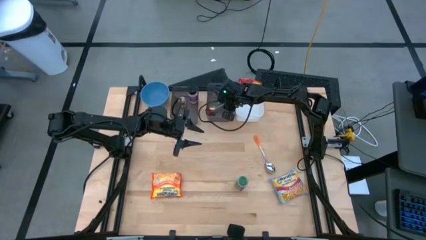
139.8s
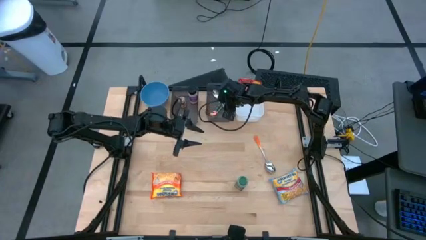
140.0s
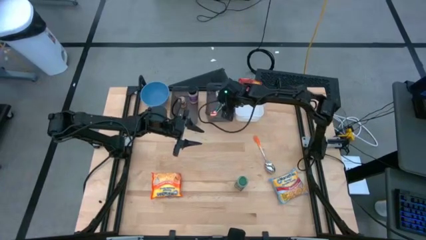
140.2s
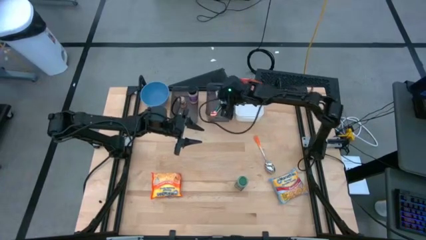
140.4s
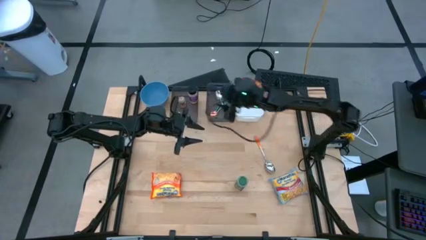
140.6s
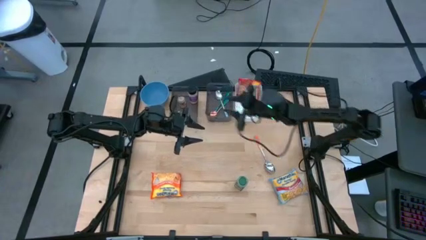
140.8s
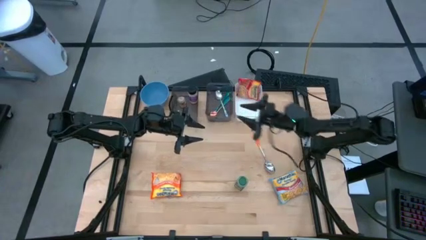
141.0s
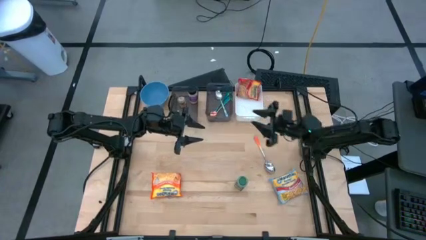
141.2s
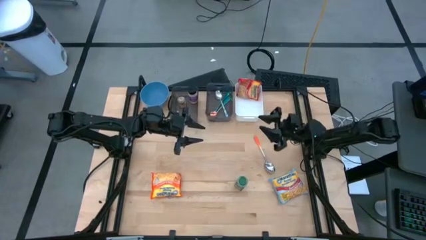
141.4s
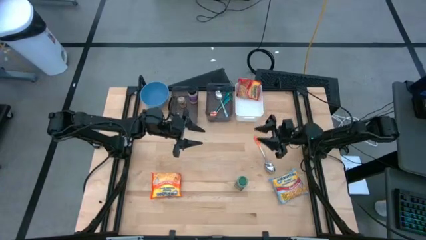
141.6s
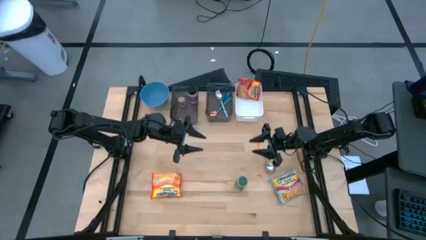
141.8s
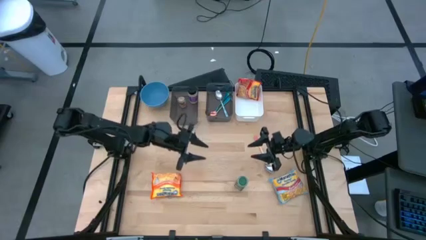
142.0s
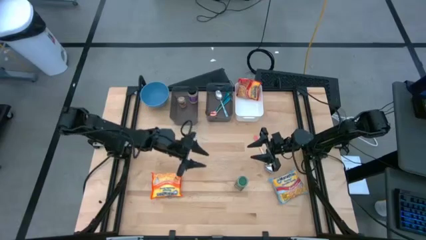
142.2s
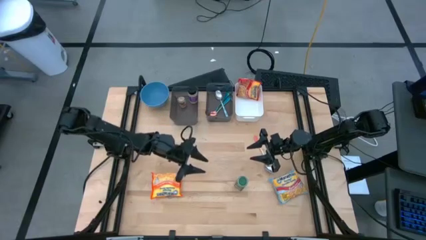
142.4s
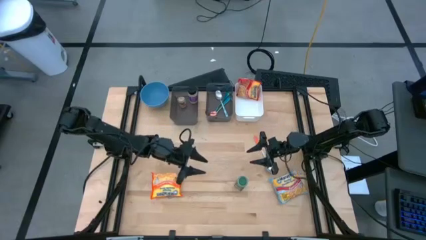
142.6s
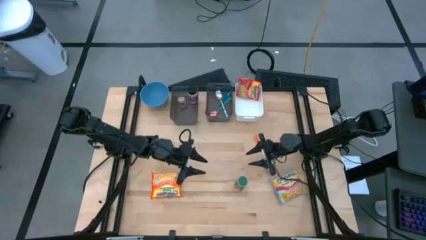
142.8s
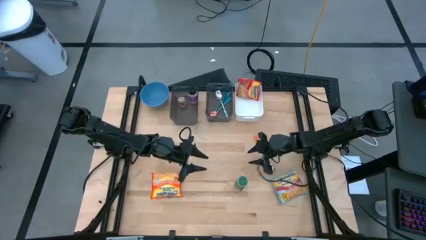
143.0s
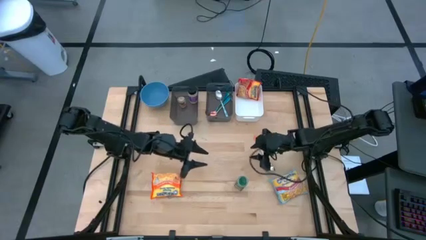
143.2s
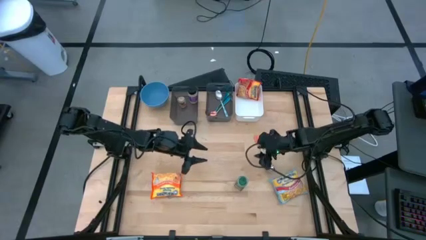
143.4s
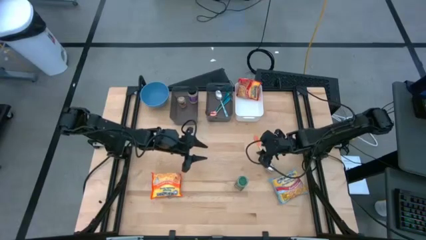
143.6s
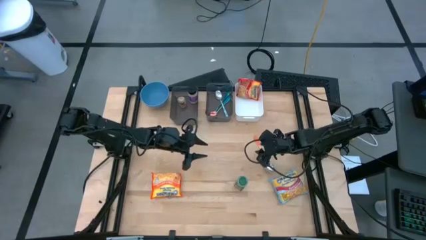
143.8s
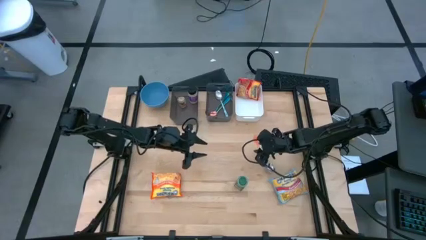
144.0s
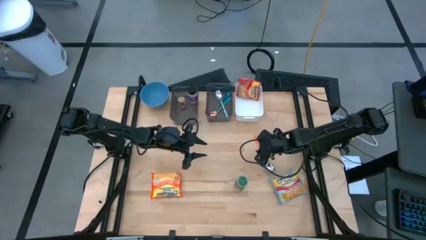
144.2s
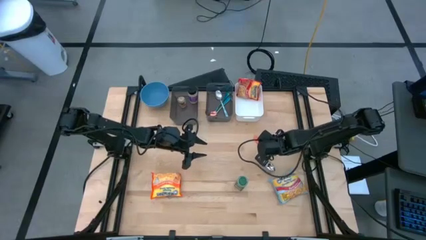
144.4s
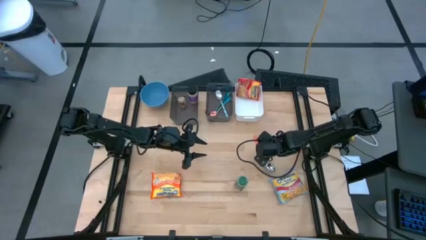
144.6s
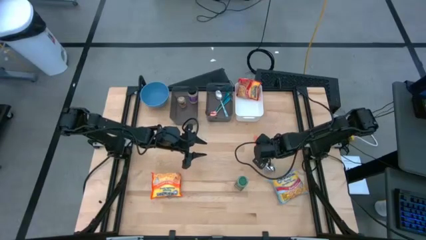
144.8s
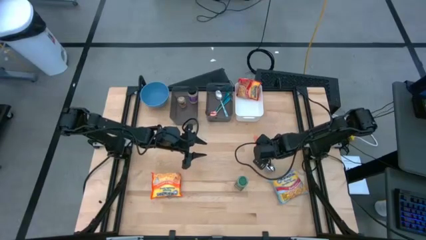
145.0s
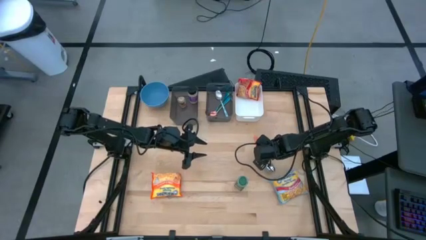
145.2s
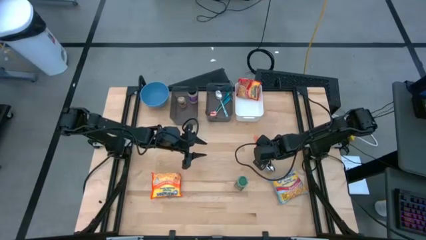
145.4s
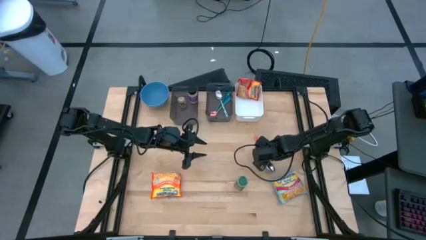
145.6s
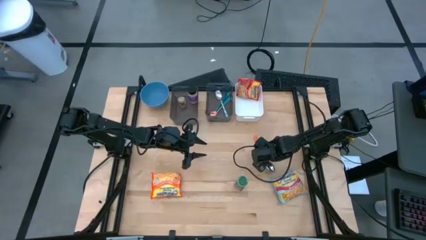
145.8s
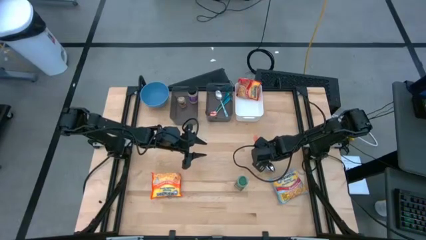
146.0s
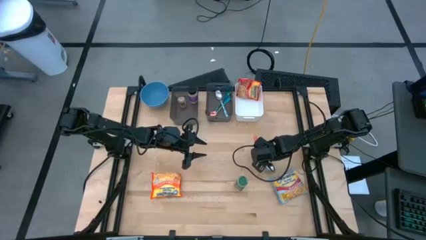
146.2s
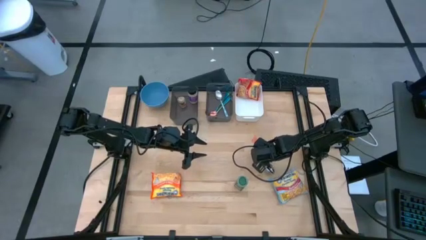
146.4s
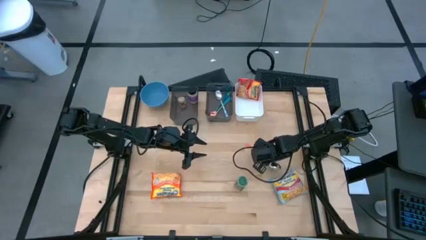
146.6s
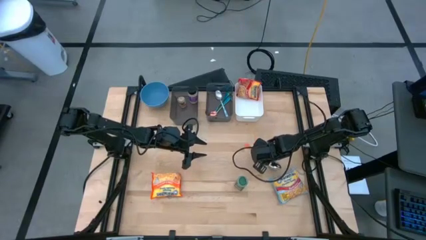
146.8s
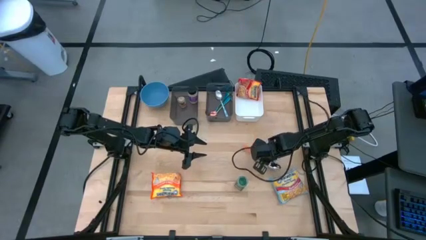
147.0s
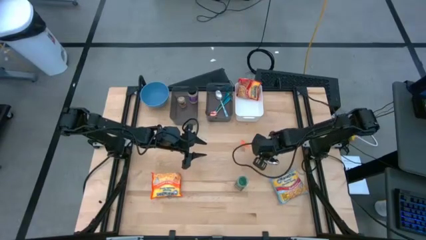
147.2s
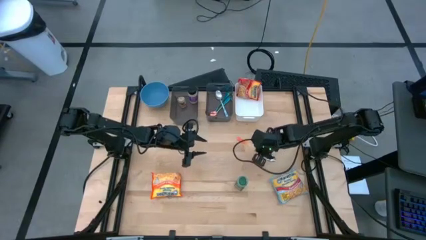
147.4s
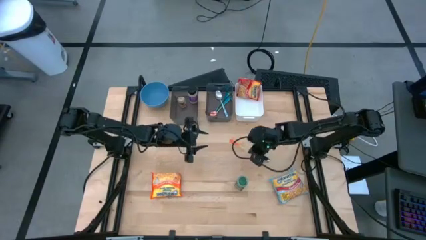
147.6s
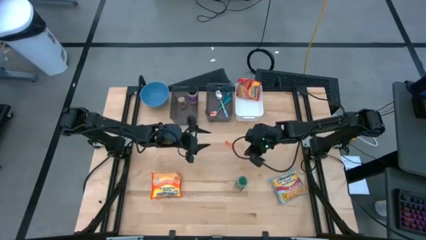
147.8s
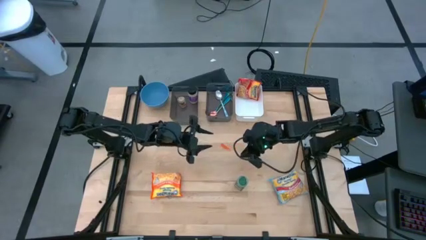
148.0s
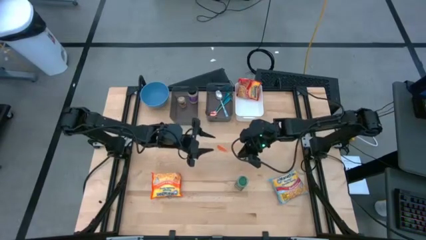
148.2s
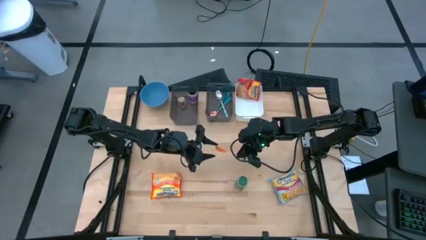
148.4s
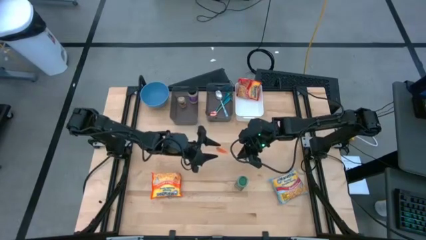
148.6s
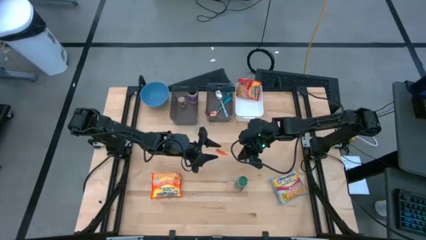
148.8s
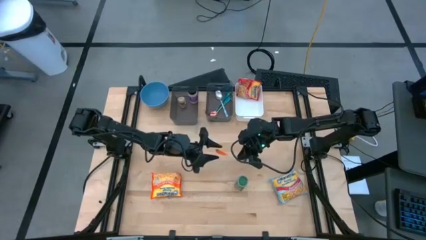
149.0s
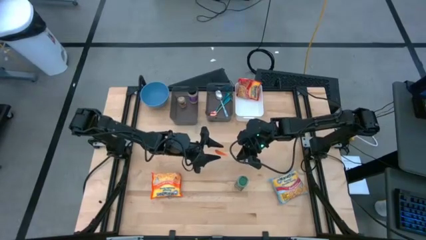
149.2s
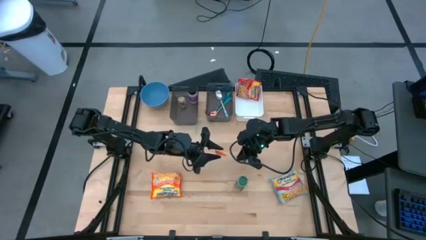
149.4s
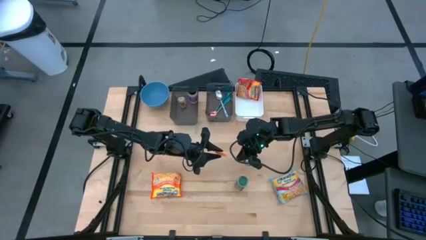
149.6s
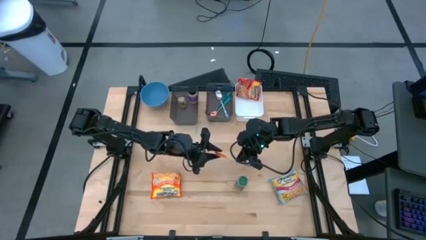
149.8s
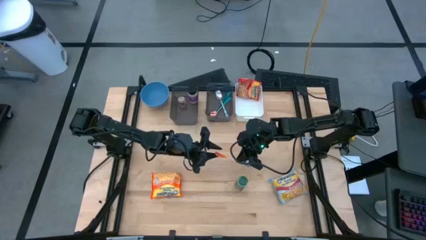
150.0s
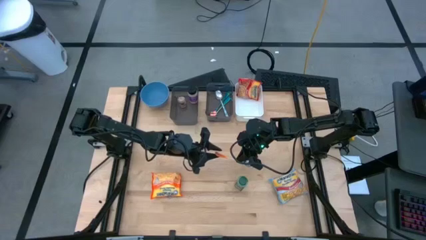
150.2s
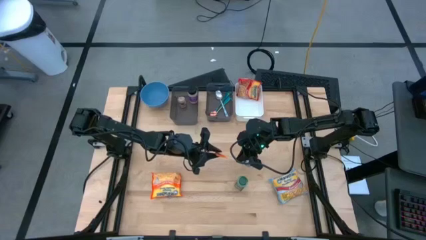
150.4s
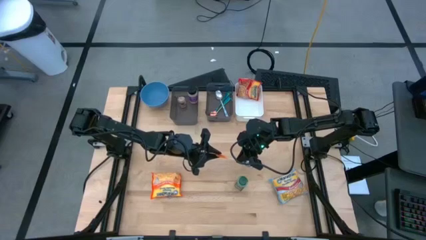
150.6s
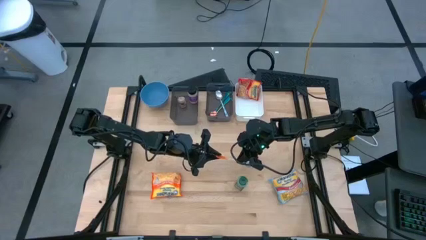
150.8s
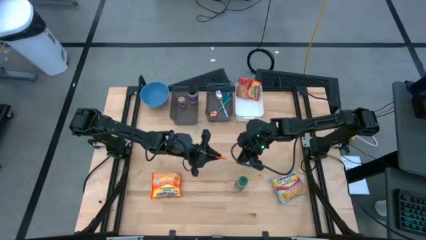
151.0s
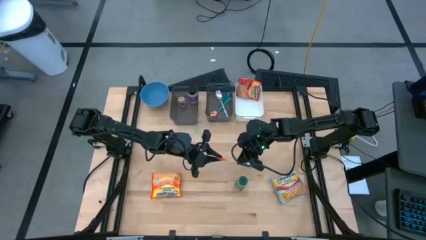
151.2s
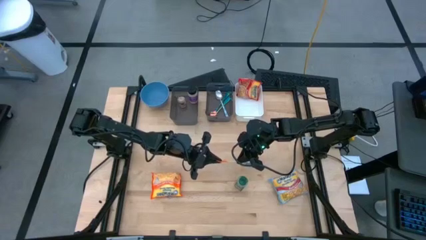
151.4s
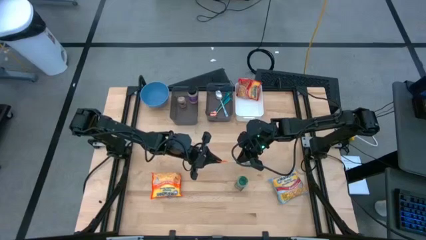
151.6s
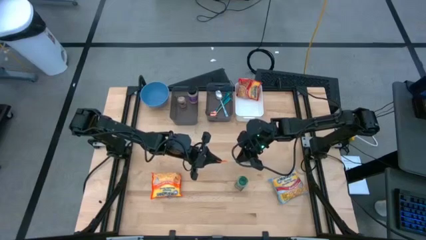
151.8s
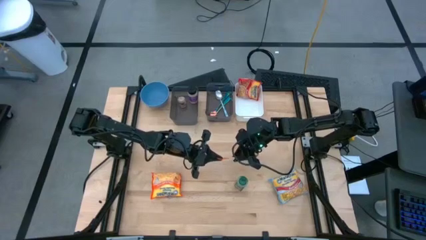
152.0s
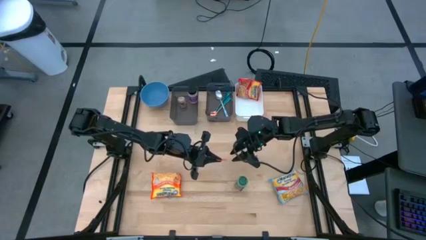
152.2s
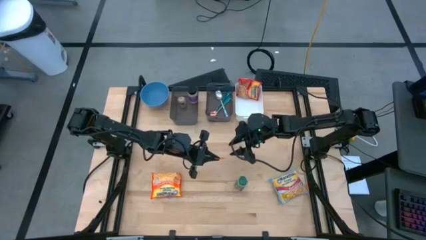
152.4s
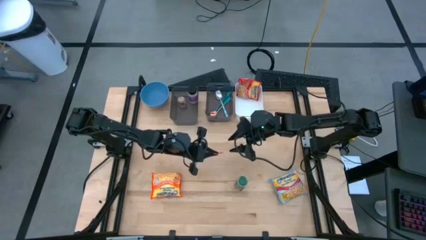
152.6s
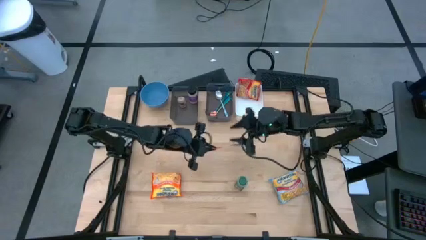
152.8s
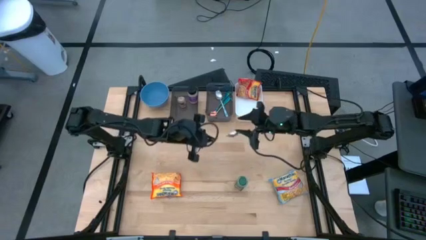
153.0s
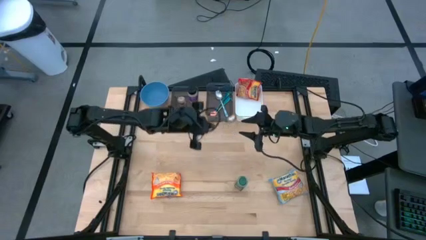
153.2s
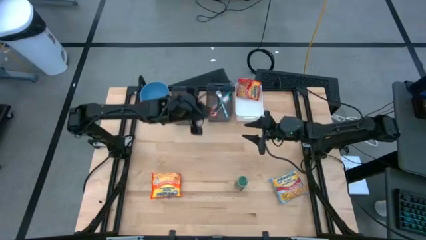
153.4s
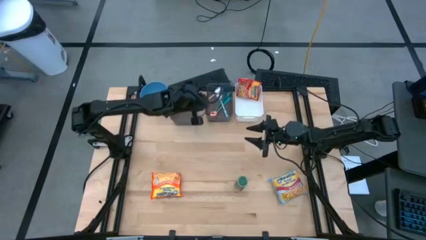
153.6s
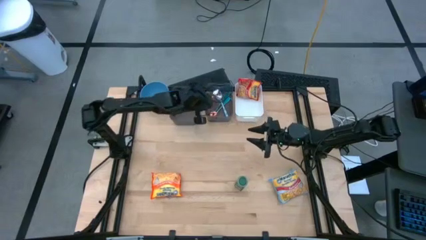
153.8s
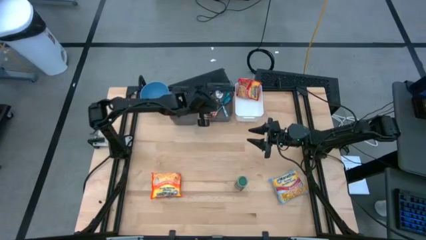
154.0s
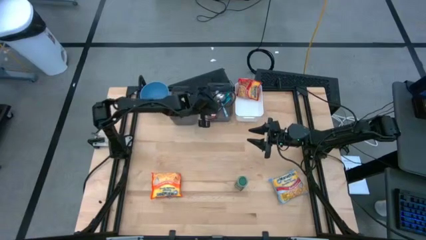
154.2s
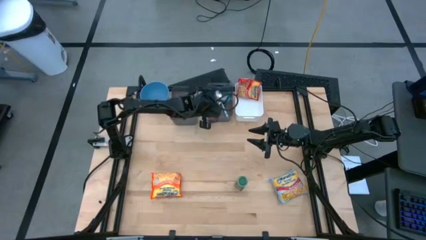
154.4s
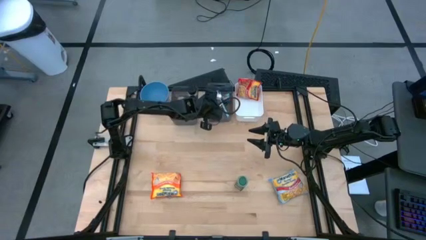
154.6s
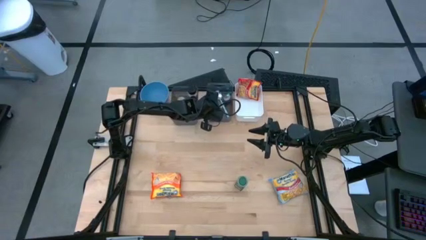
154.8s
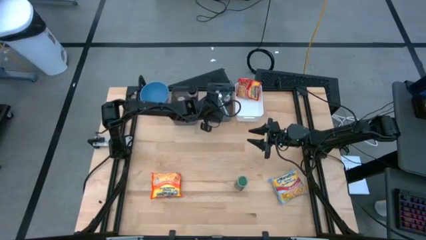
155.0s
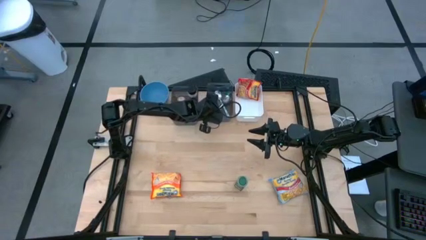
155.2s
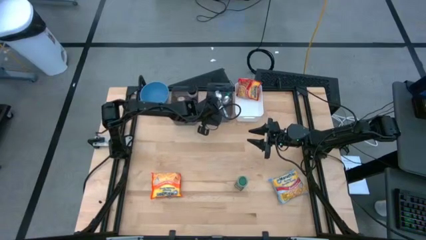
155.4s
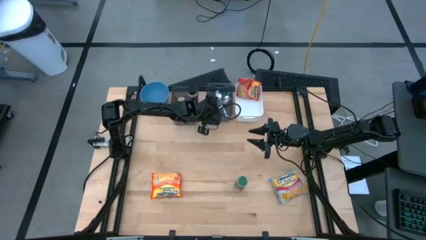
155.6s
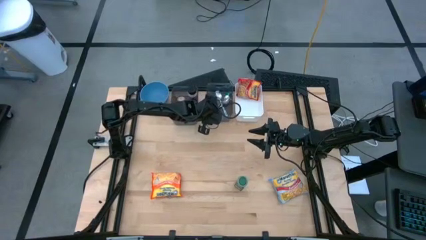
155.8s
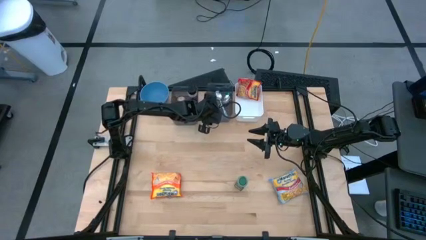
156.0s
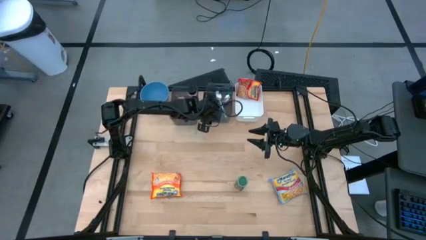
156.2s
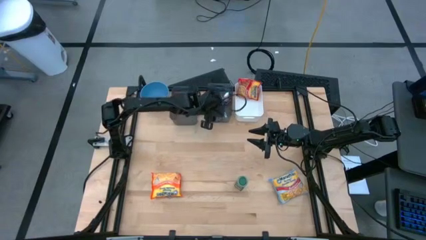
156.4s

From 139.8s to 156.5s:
Task: Pick & Place Food Item
Put the orange spoon into the right black bin
